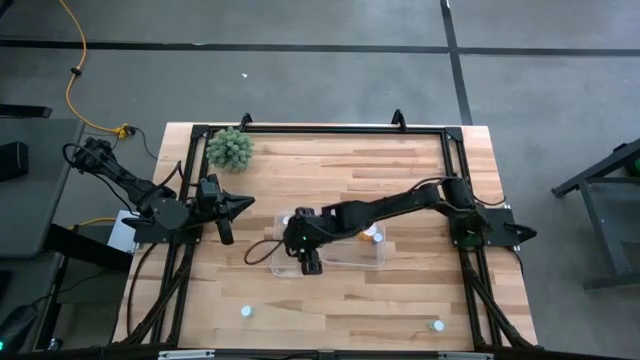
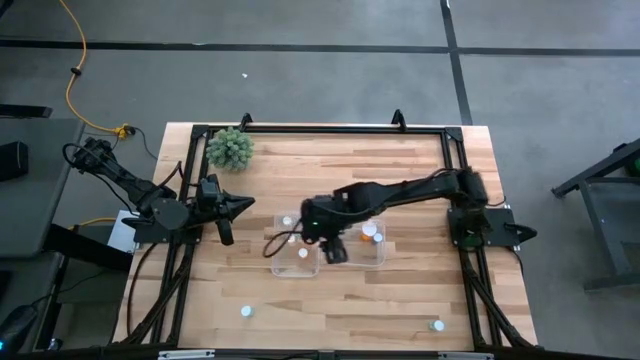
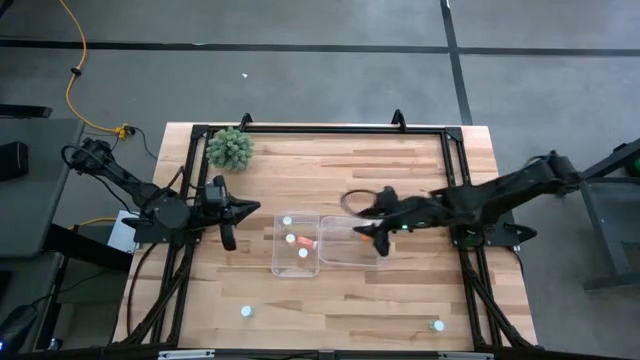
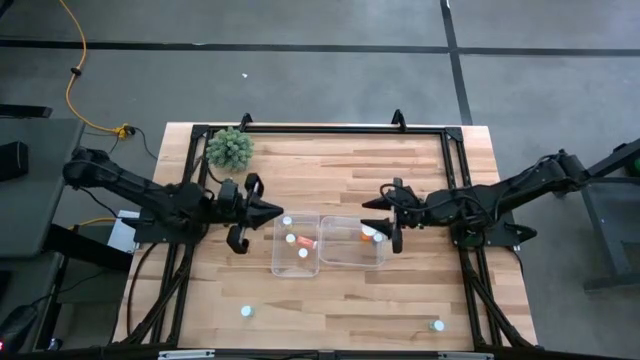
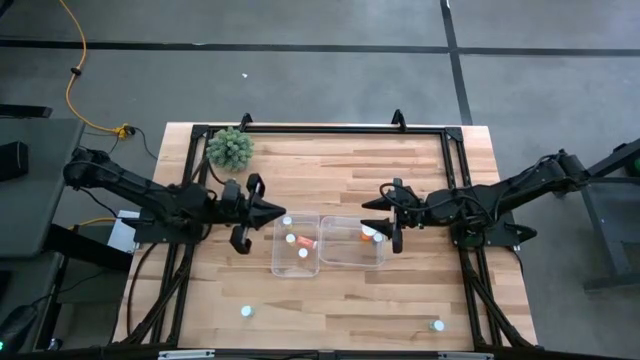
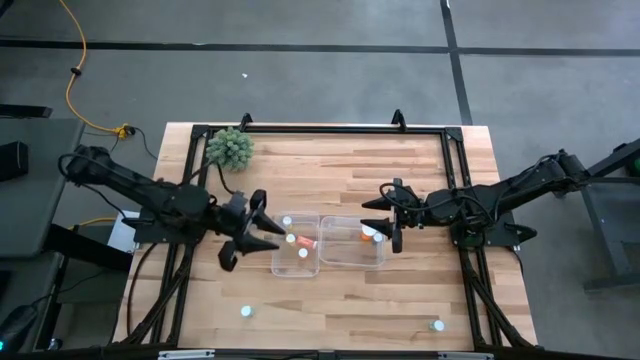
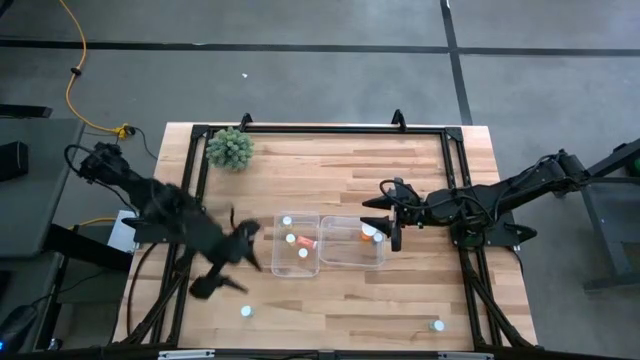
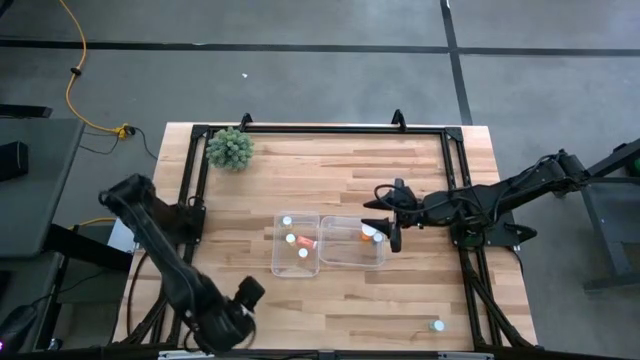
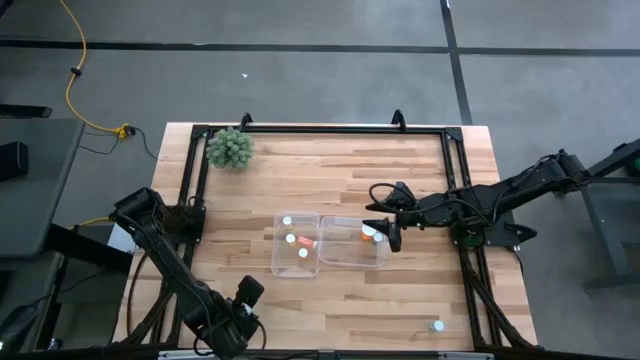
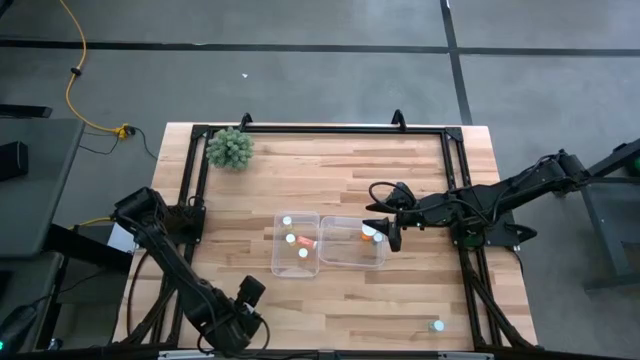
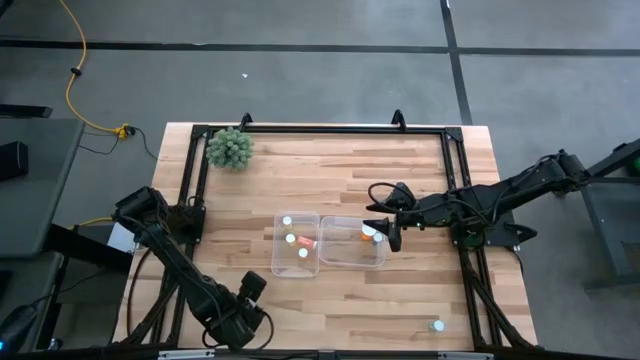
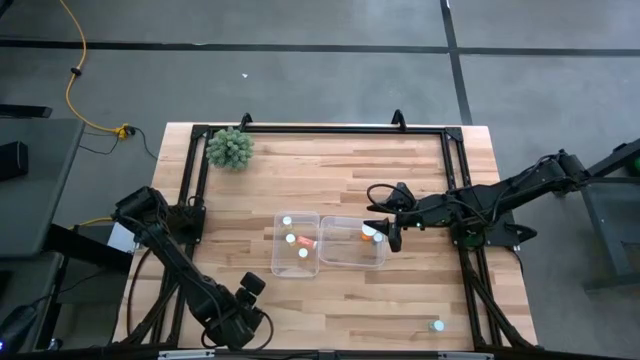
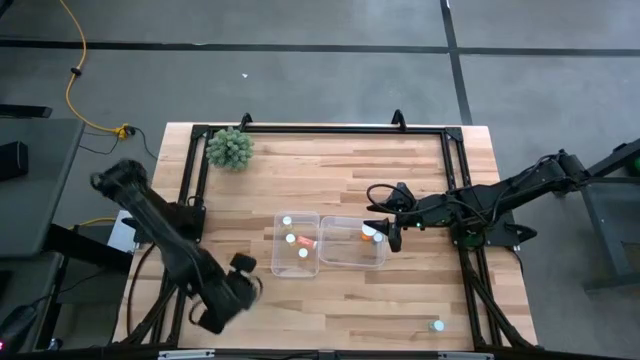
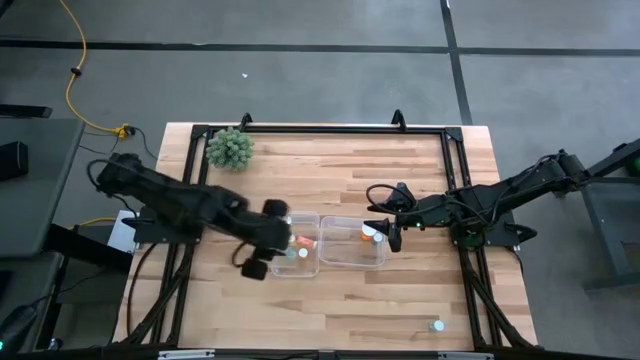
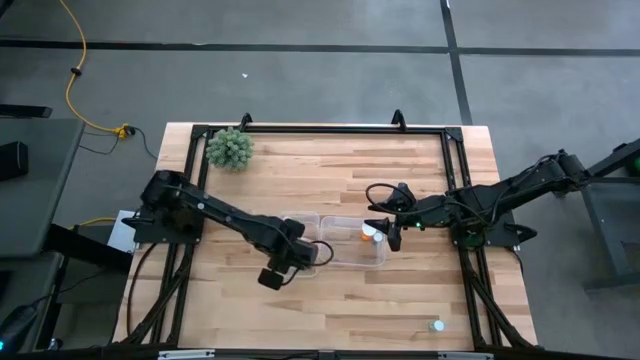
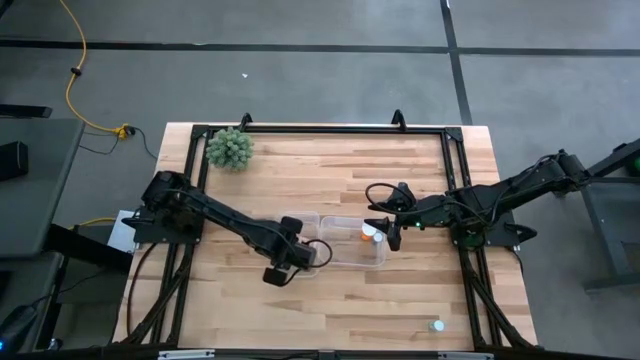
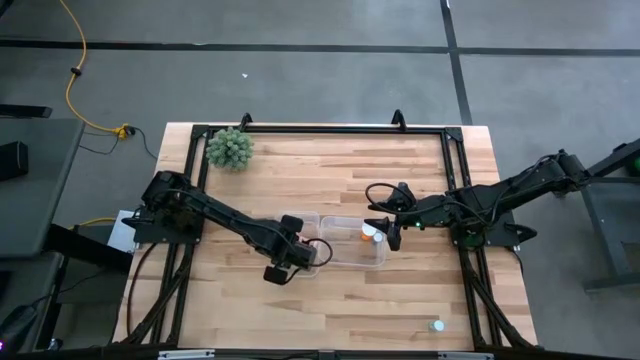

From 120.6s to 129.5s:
Task: Pick and place medicine bottles into bin by pill shape (circle, oval)
Put the left blue pill bottle into the left transparent bin

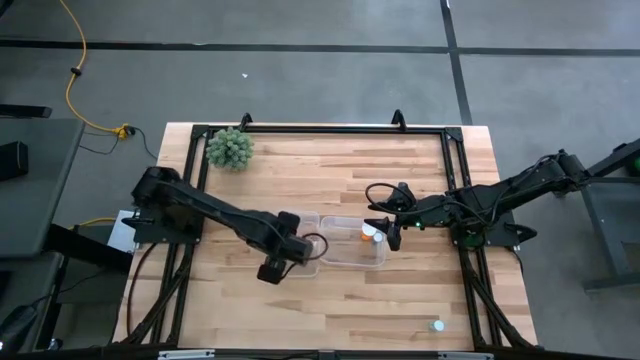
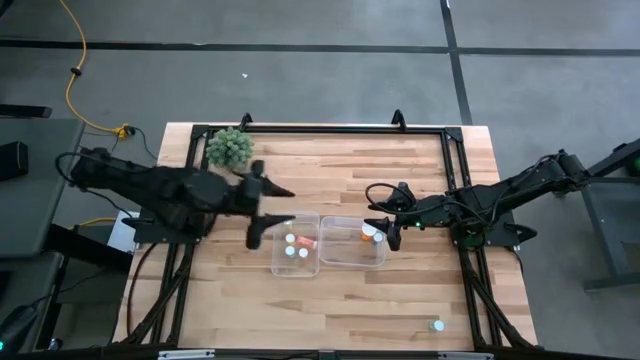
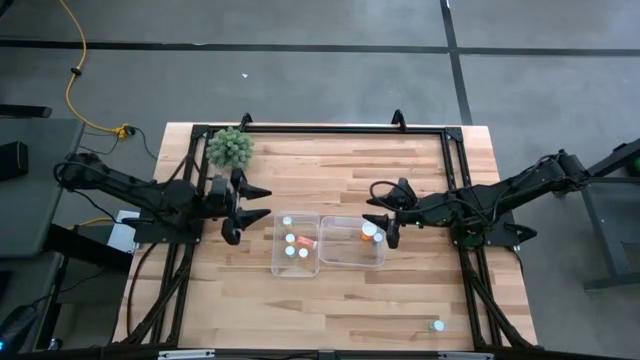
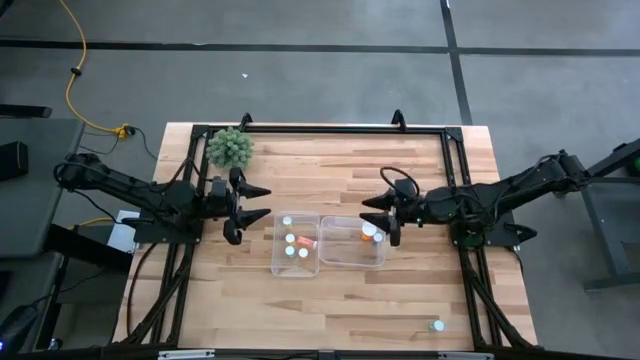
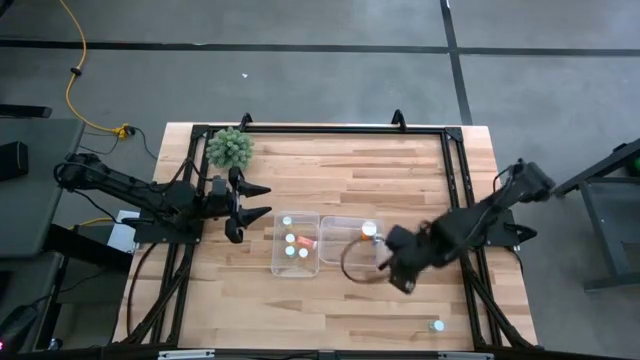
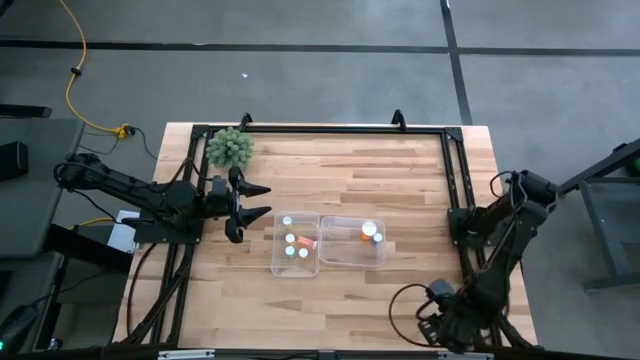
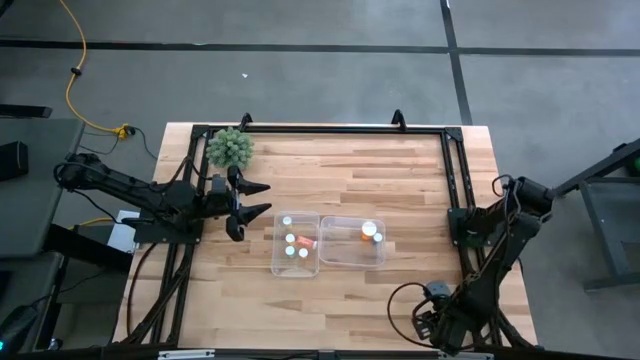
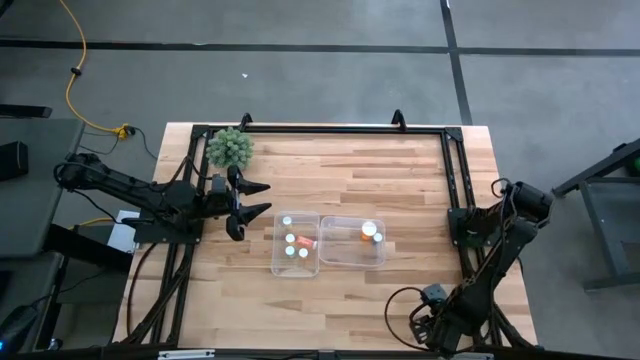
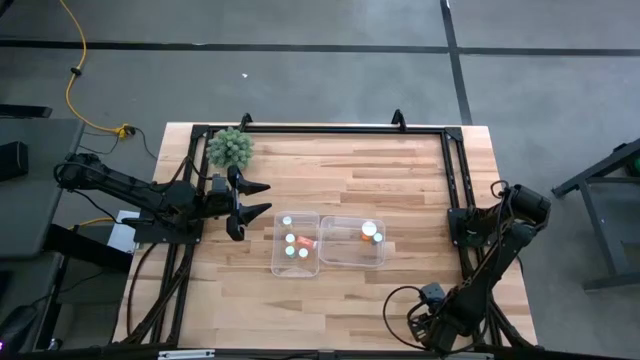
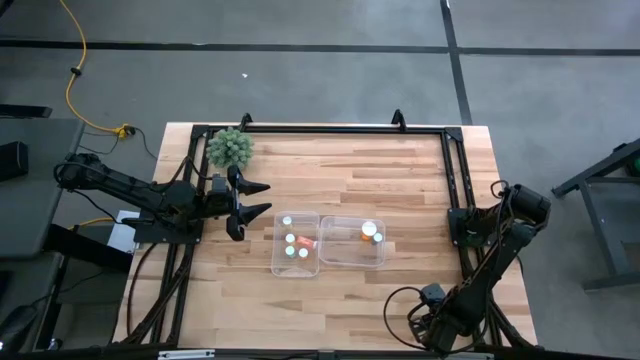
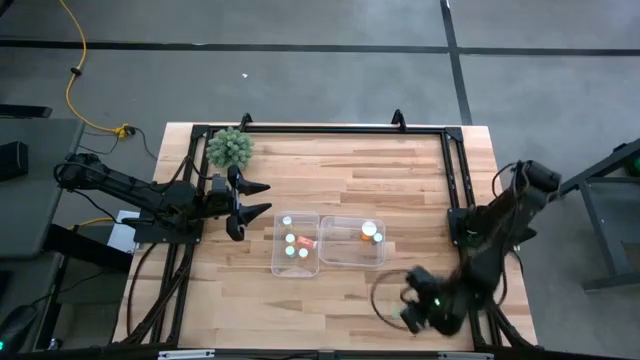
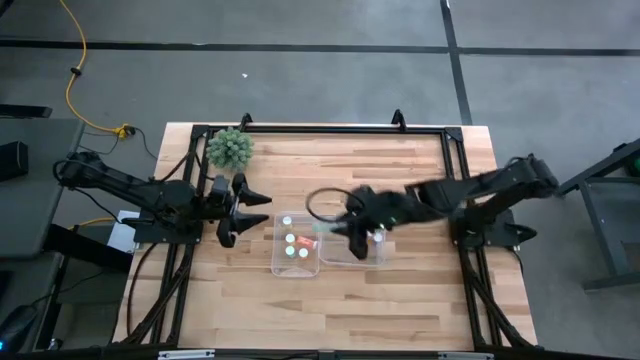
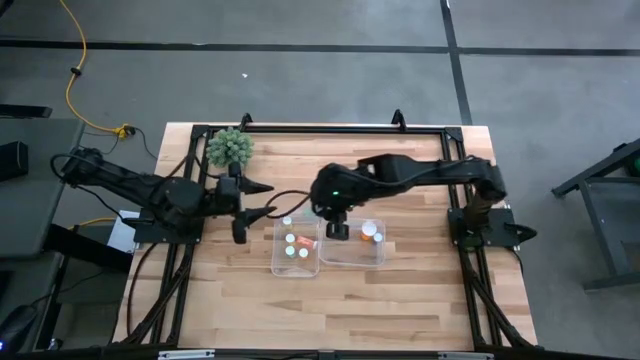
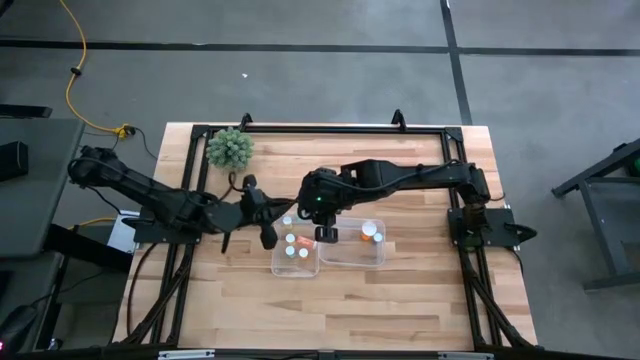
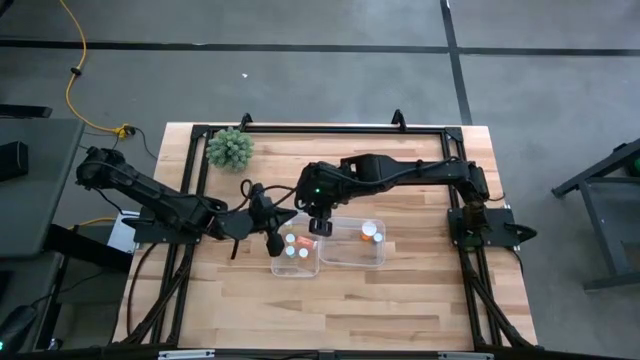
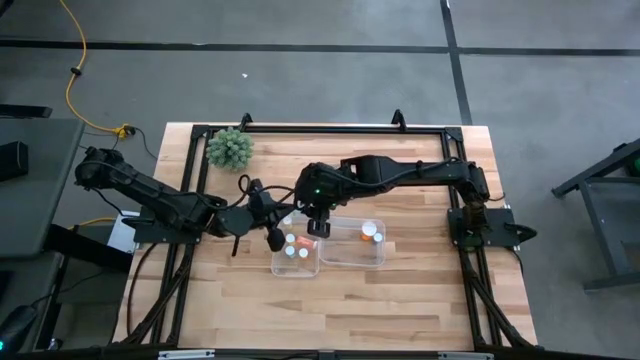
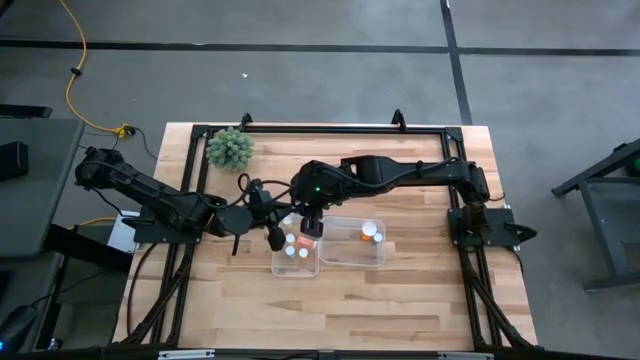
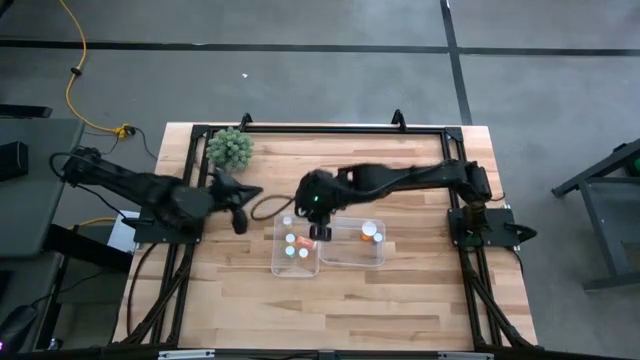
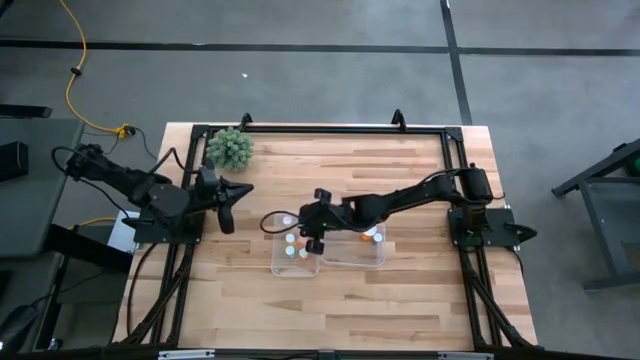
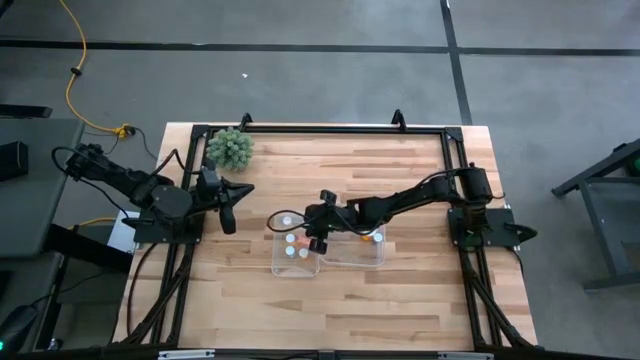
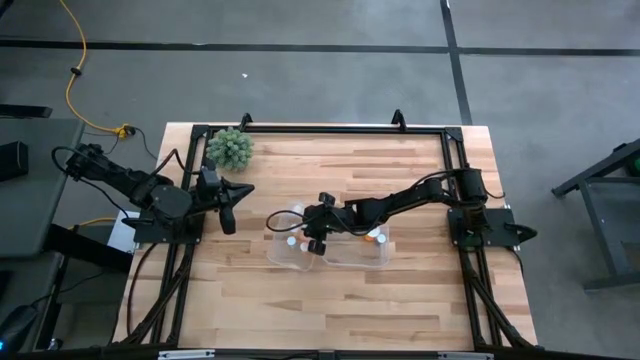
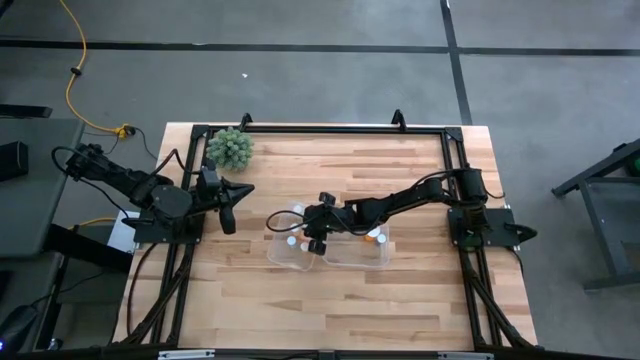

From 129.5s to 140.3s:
Put the blue pill bottle into the left transparent bin

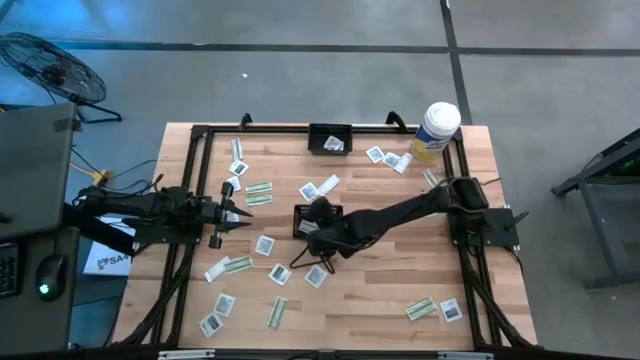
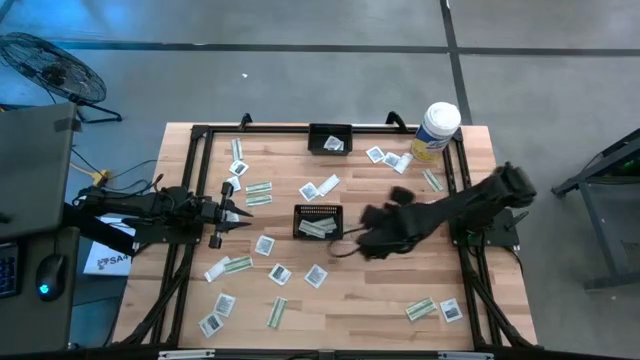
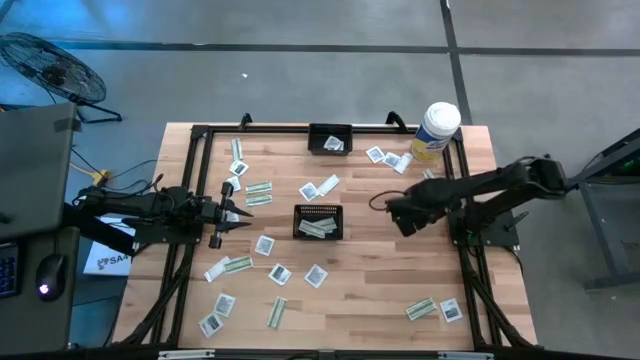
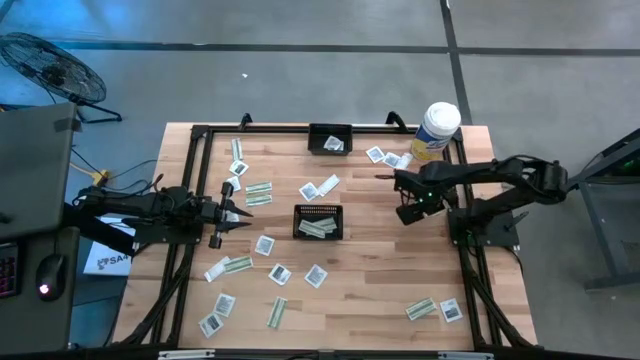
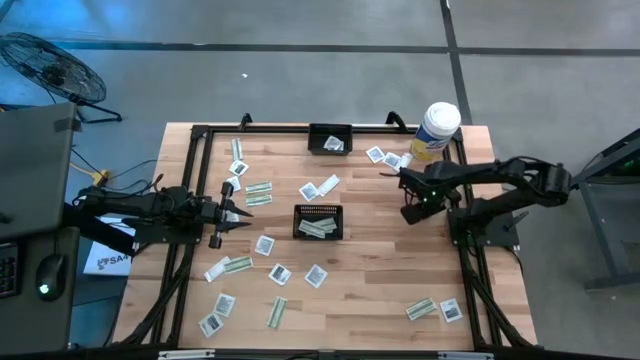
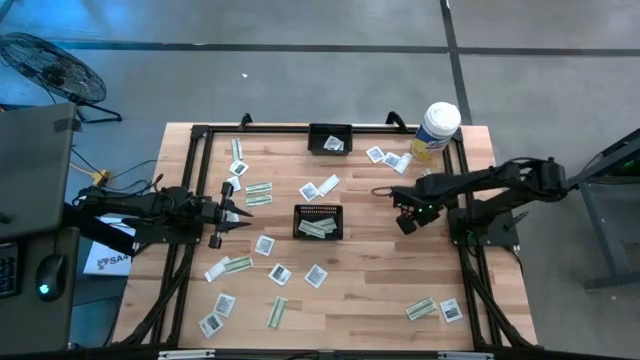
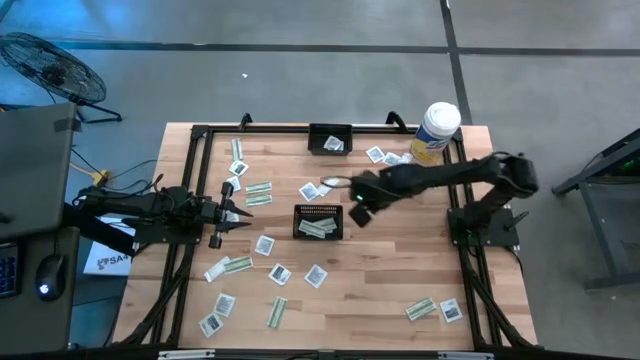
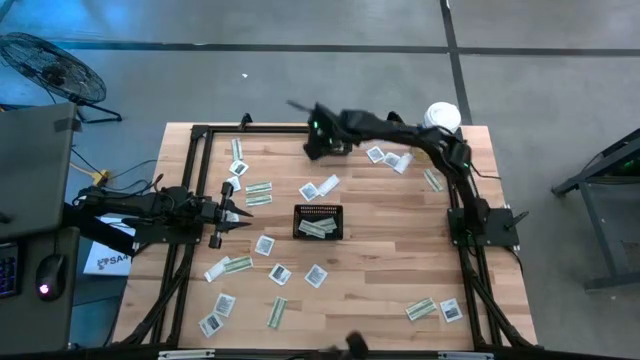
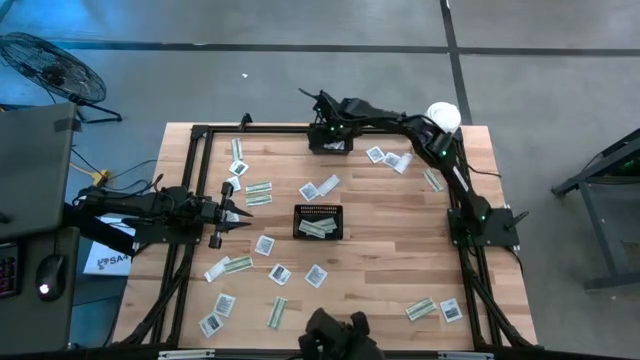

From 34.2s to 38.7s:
Task: Pick & Place First Aid Supplies
Put the towelette pack into the top black basket
